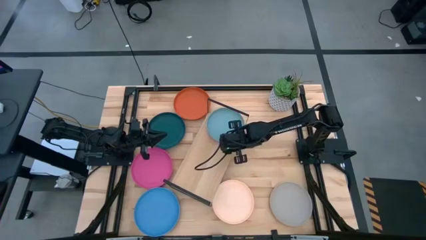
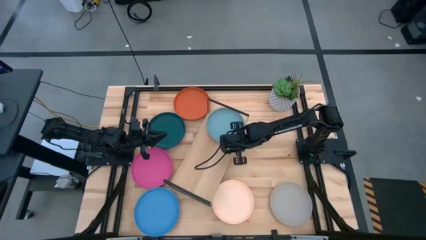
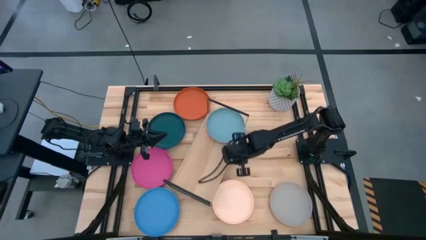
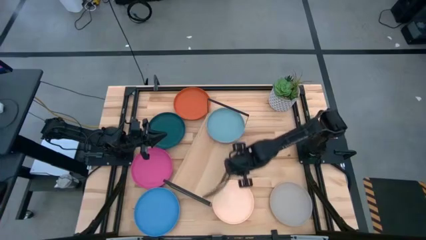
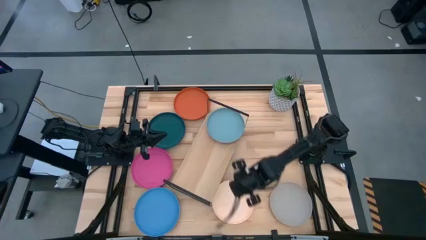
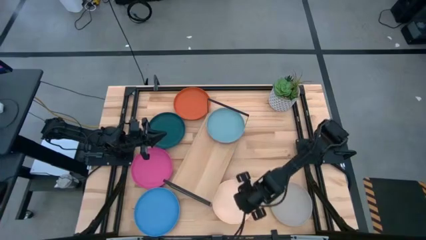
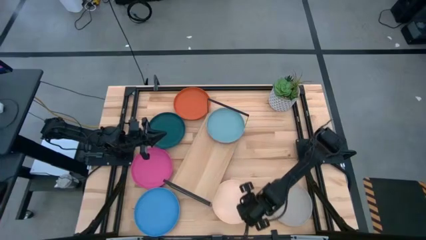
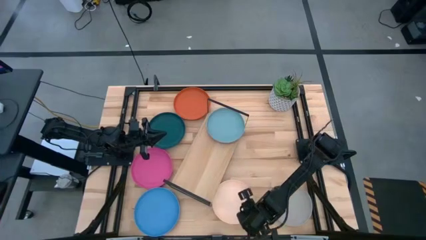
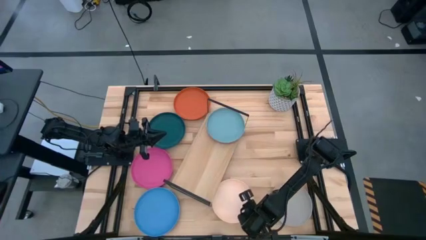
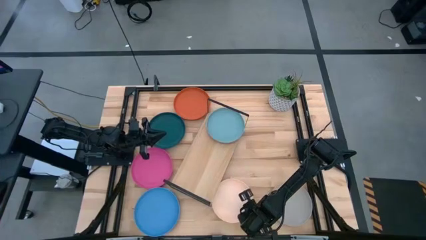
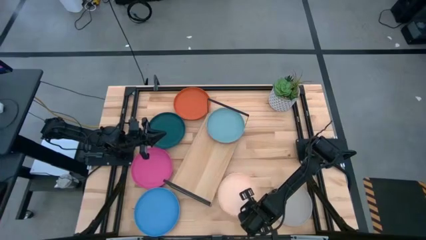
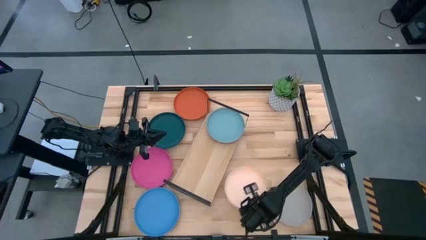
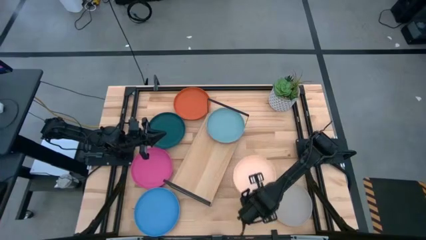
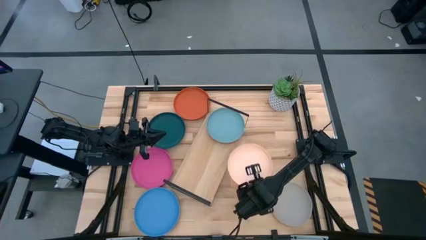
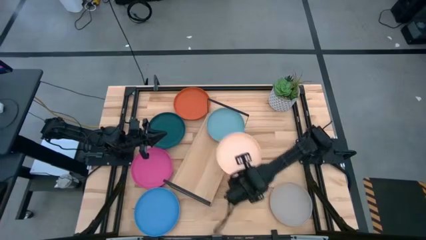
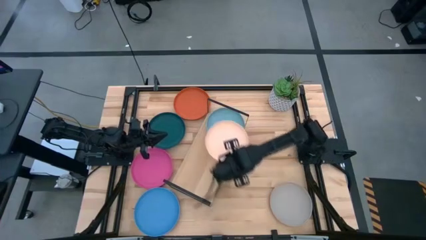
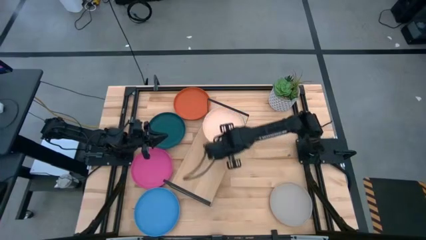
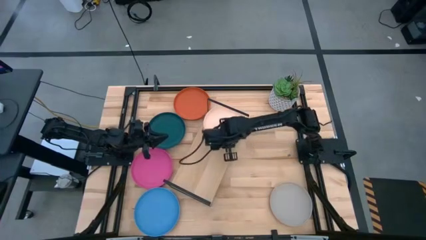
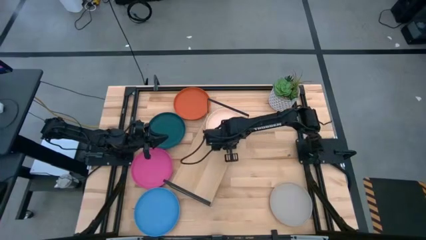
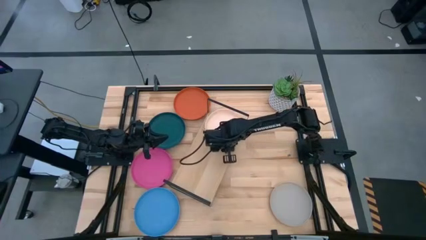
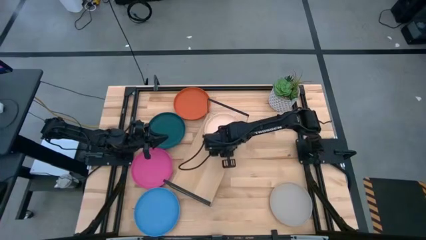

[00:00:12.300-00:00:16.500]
Task: Place and stack plates onto a shelf
Stack the light pink plate on top of the light blue plate on the shelf

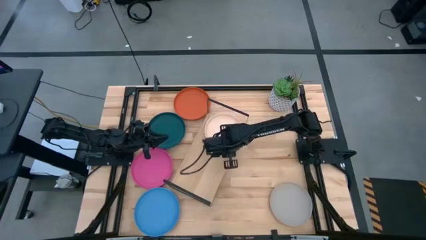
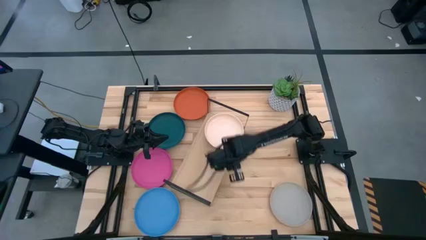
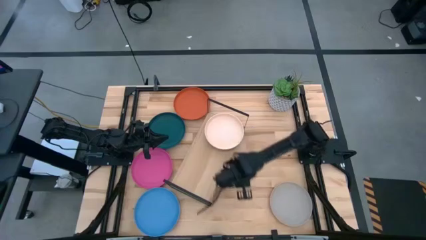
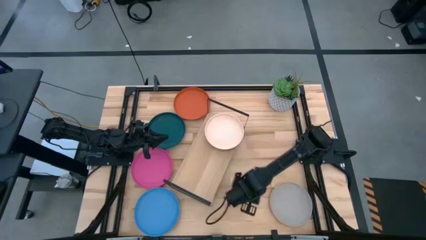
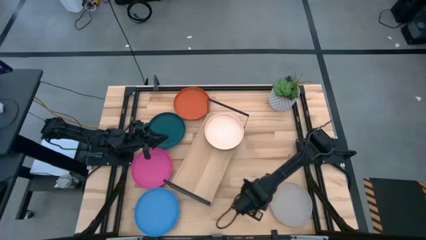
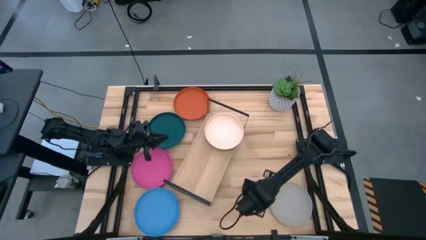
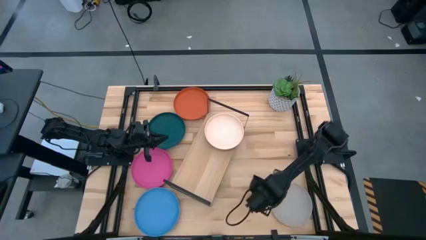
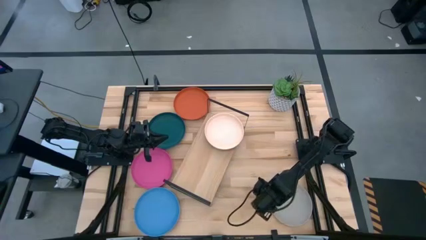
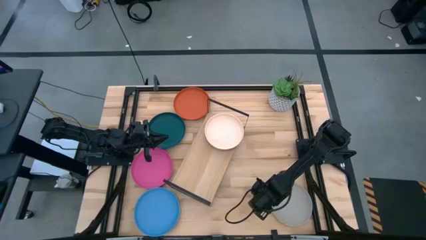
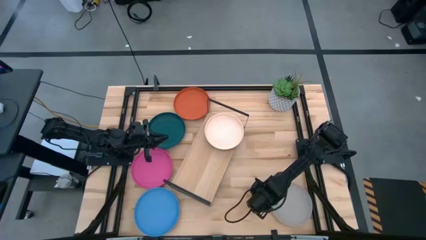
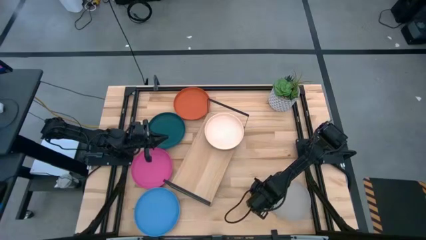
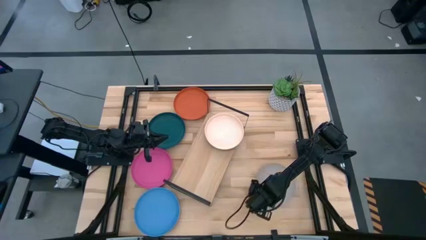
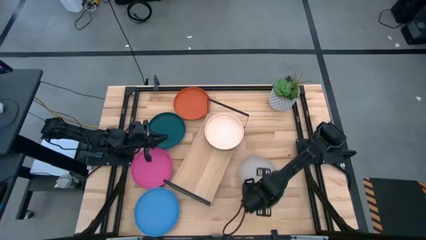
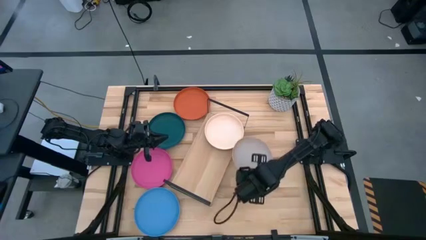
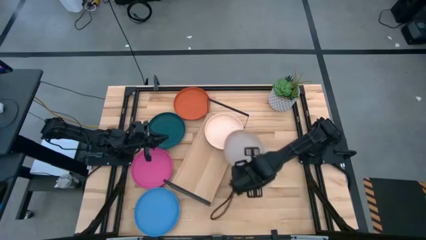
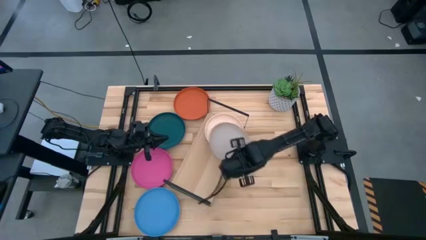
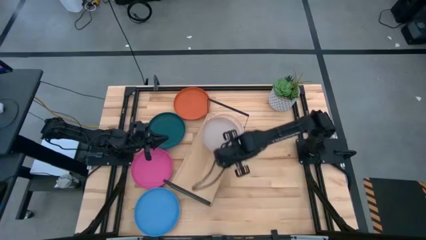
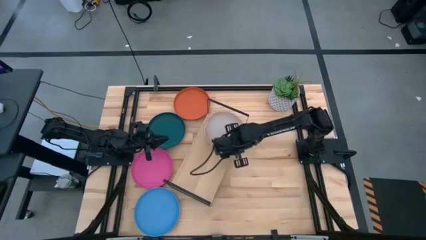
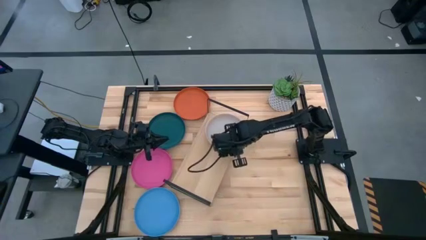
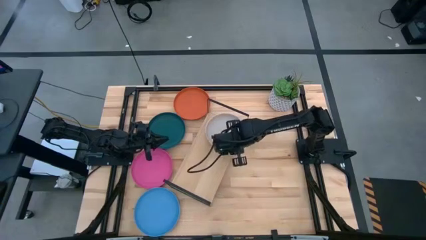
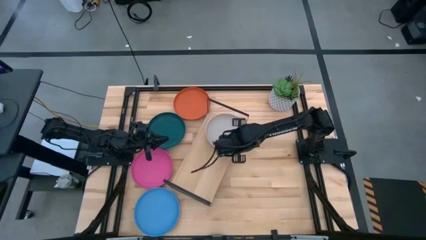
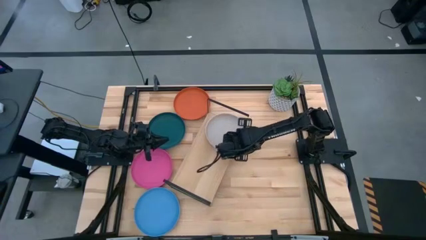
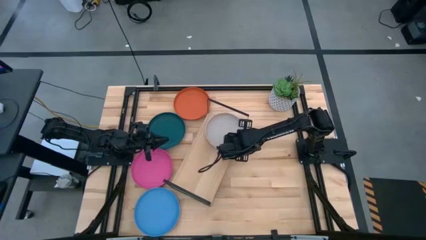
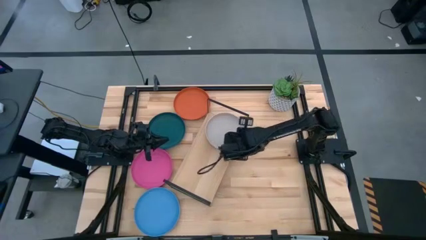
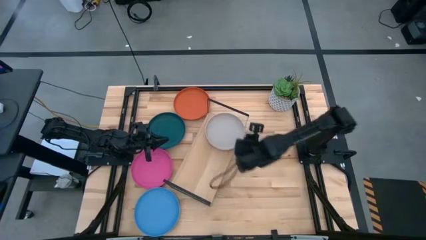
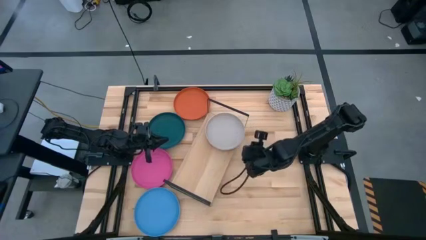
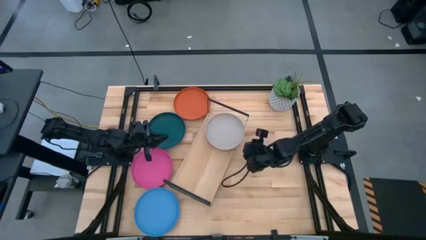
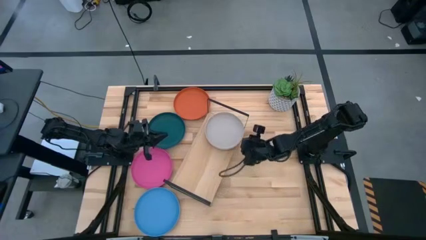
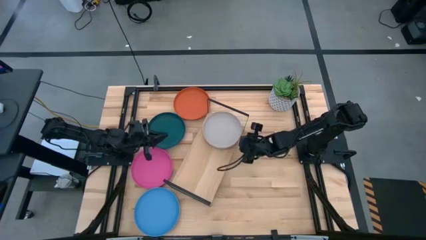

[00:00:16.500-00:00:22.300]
Stack the gray plate on top of the light pink plate on the shelf

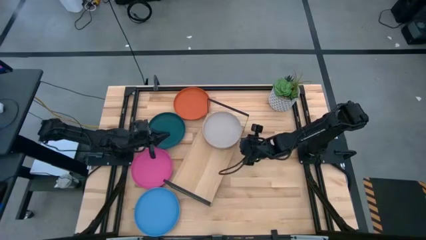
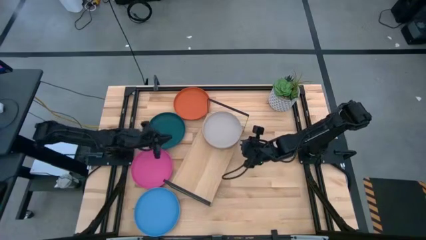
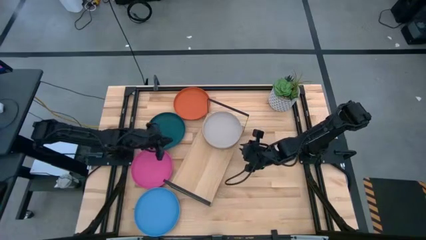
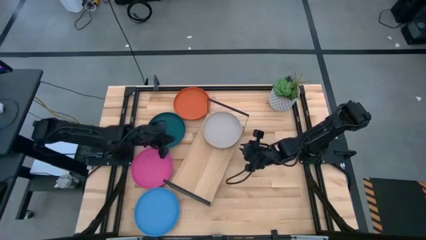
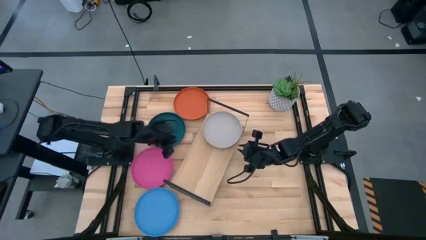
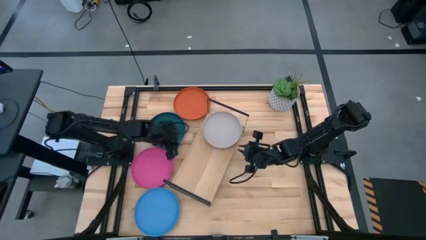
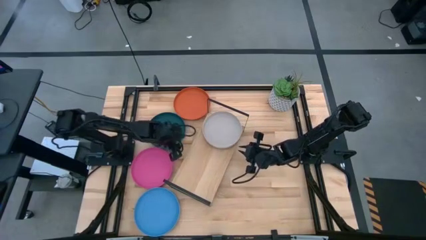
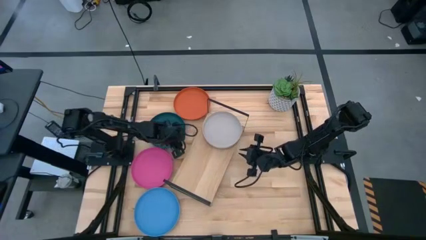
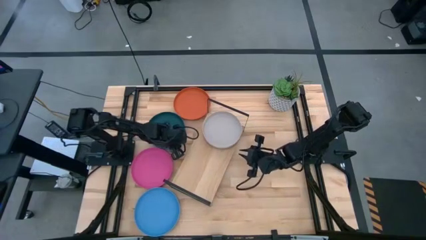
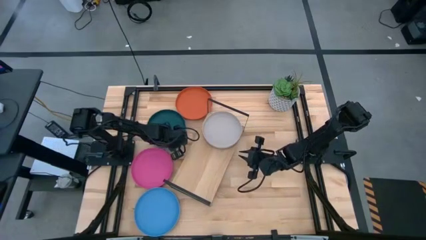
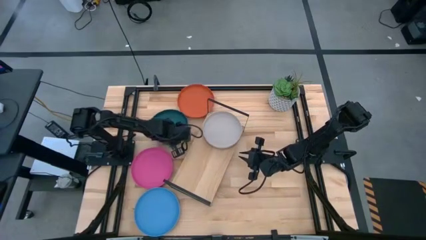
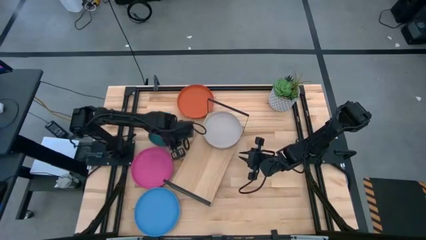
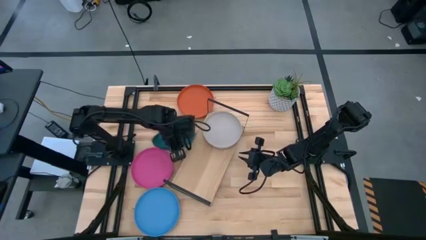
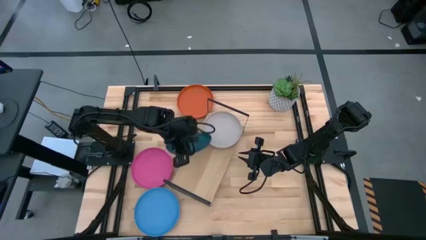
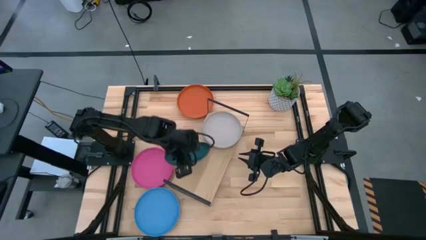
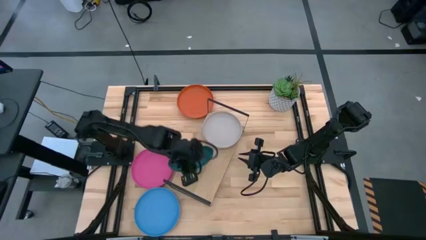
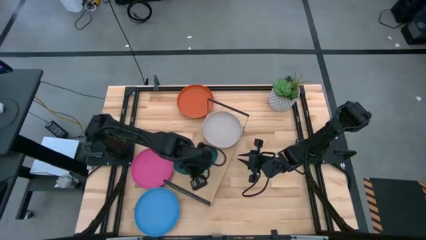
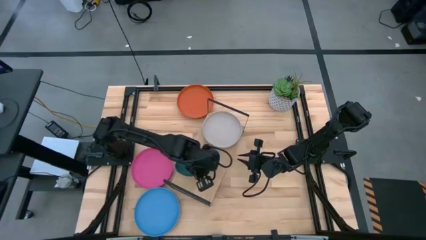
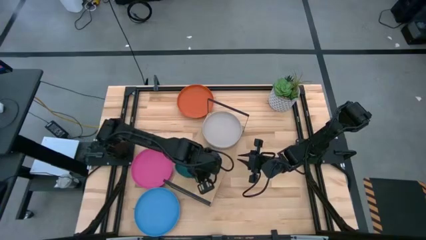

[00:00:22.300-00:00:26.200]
Put the dark green plate on the shelf

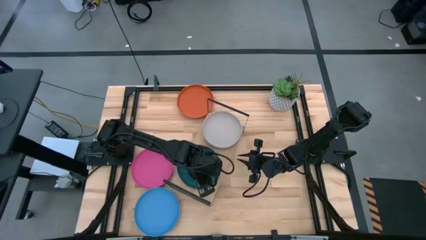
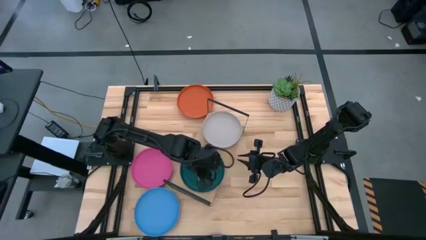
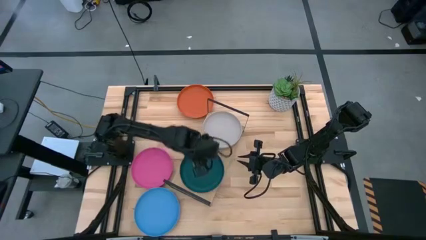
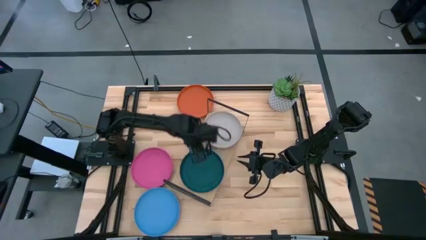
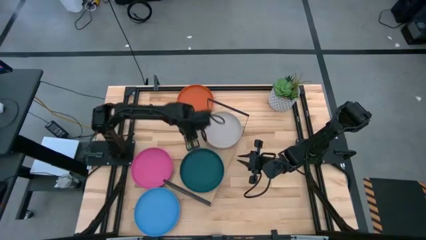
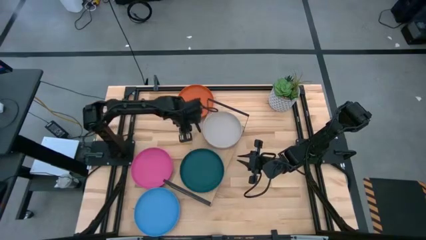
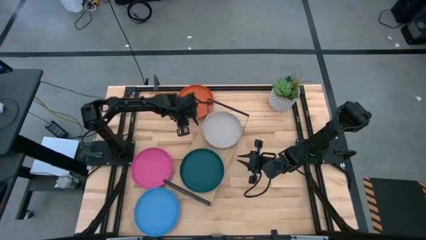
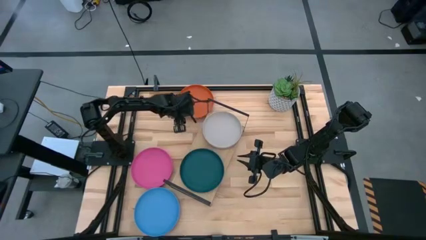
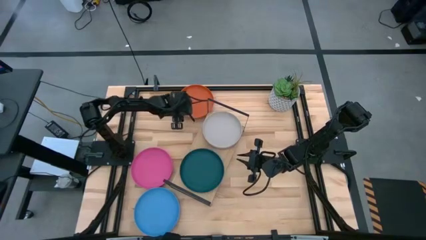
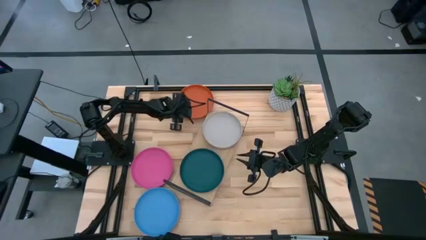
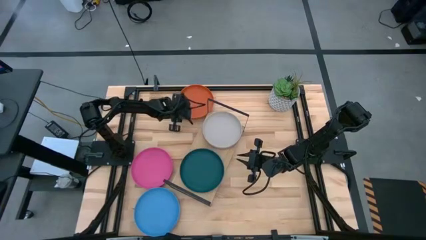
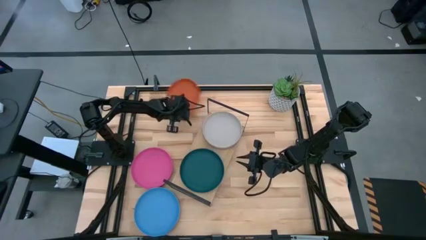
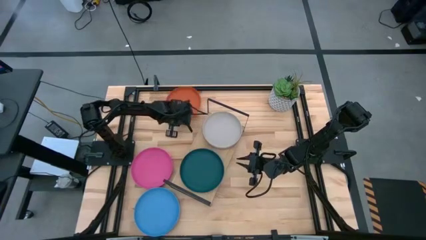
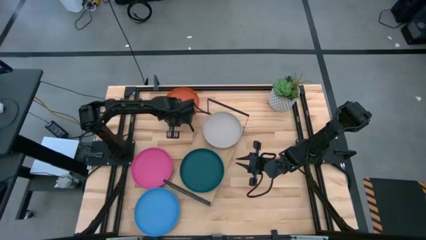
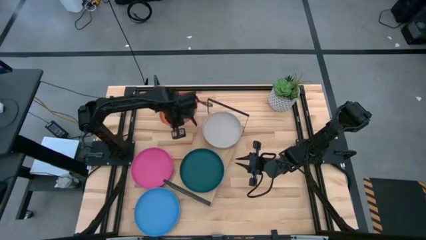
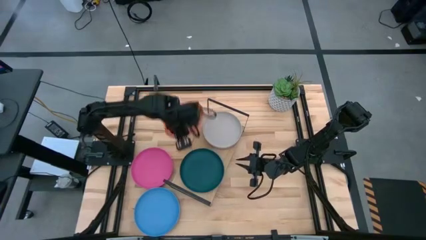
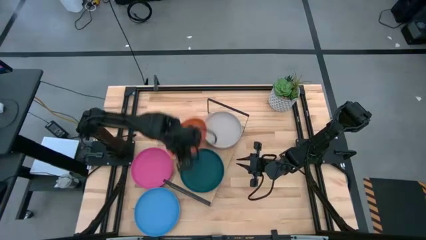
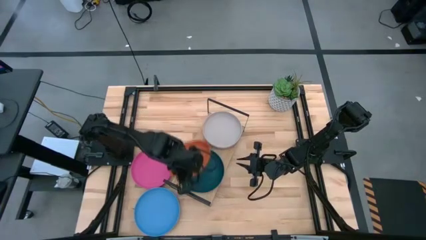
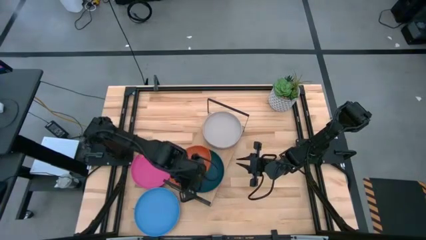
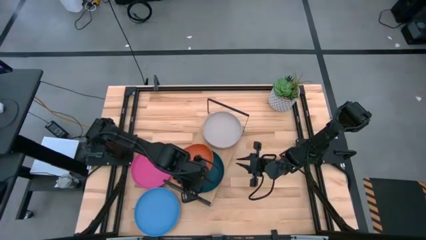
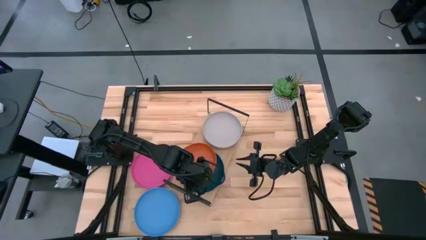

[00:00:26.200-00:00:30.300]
Stack the orange plate on top of the dark green plate on the shelf
